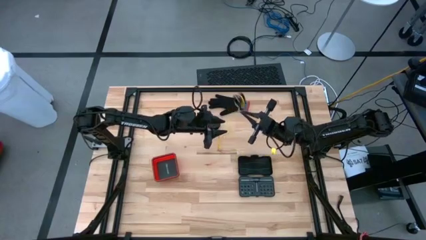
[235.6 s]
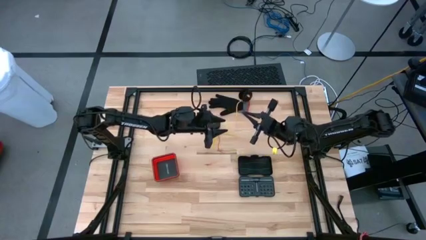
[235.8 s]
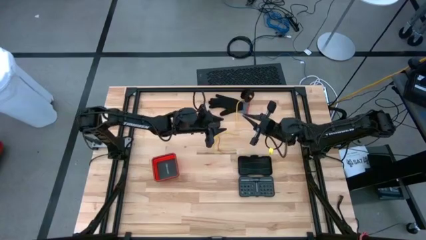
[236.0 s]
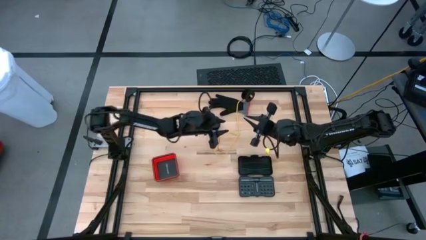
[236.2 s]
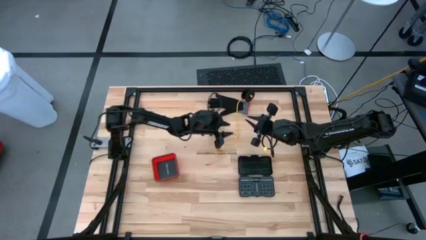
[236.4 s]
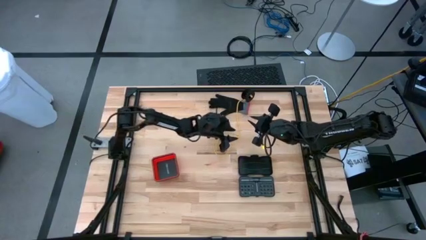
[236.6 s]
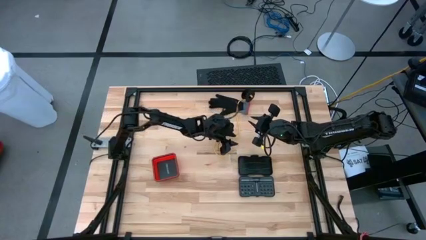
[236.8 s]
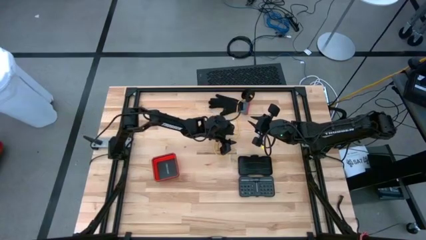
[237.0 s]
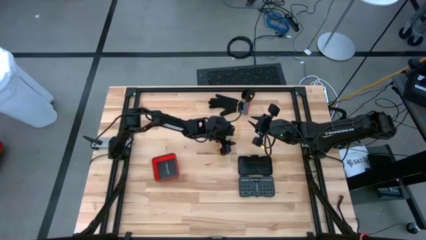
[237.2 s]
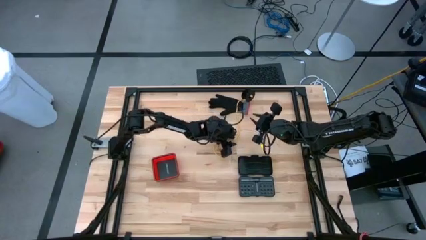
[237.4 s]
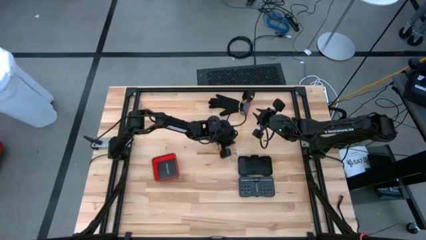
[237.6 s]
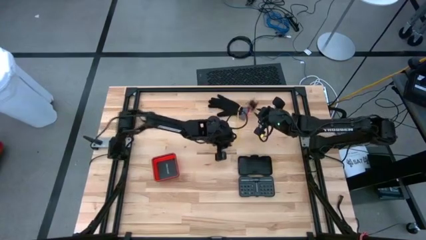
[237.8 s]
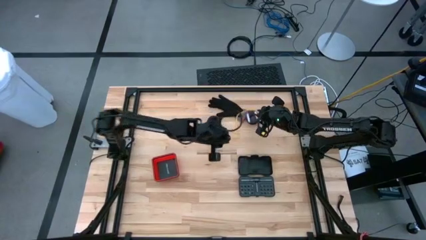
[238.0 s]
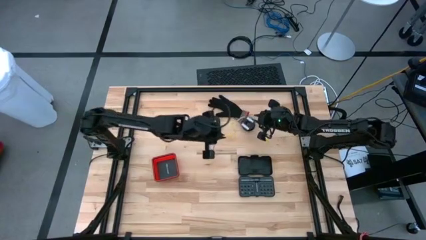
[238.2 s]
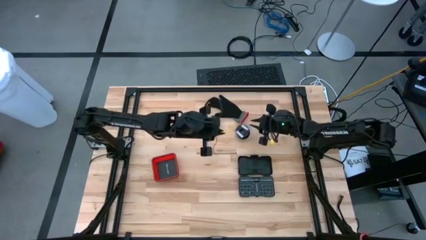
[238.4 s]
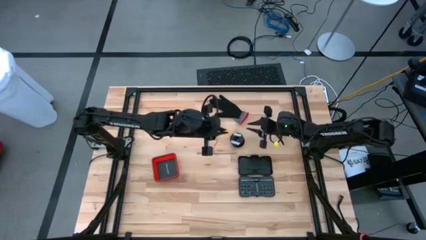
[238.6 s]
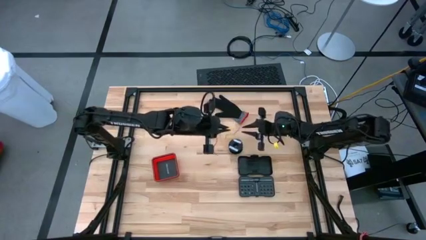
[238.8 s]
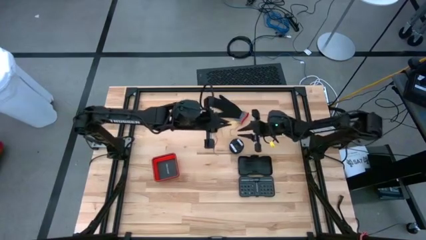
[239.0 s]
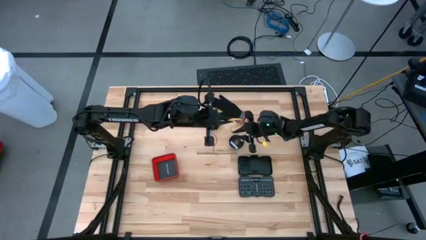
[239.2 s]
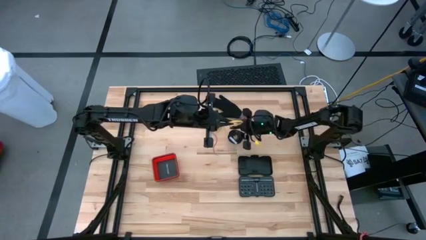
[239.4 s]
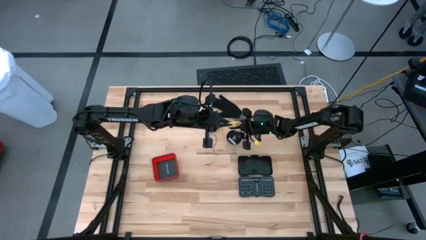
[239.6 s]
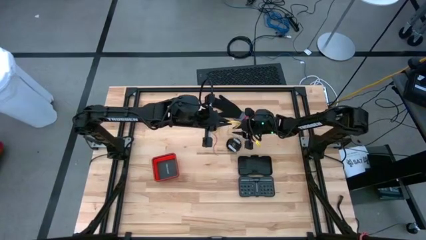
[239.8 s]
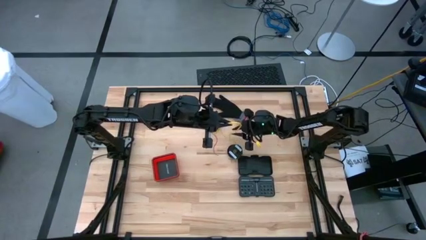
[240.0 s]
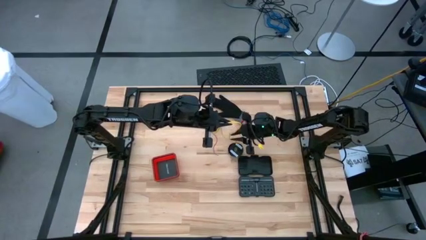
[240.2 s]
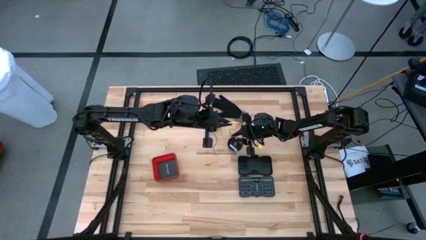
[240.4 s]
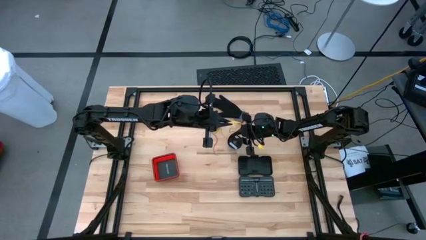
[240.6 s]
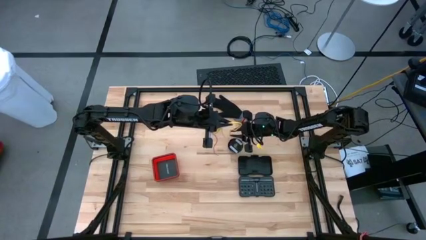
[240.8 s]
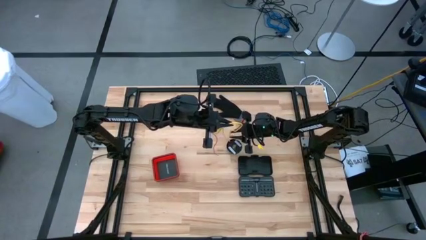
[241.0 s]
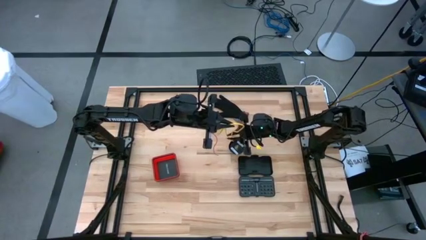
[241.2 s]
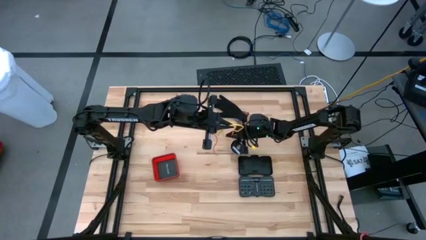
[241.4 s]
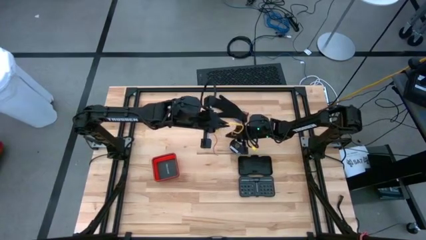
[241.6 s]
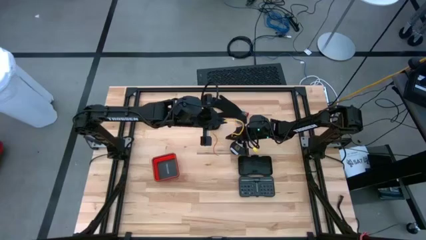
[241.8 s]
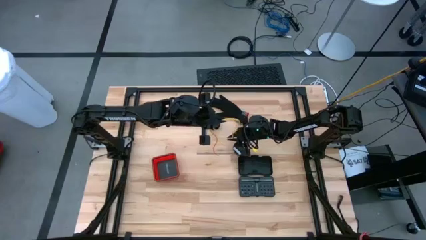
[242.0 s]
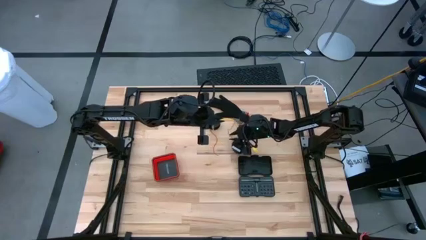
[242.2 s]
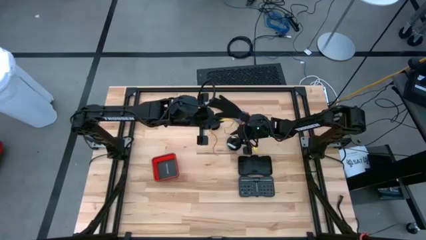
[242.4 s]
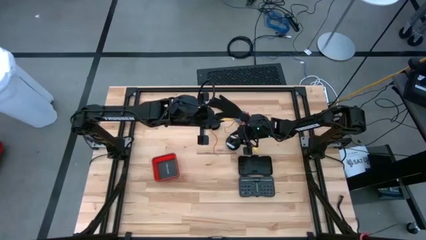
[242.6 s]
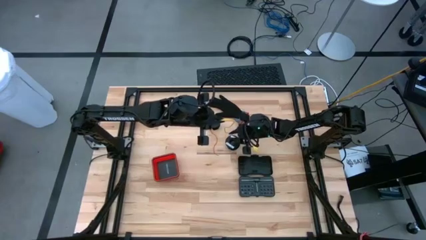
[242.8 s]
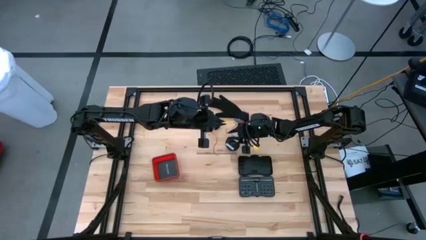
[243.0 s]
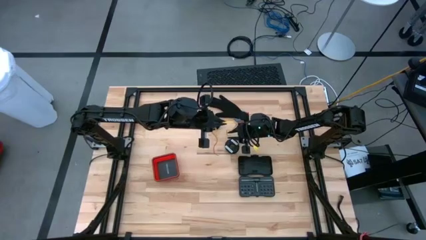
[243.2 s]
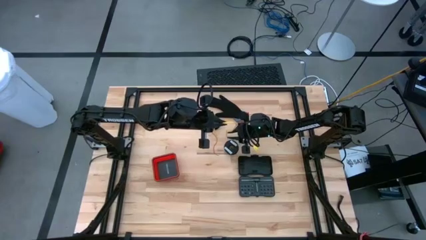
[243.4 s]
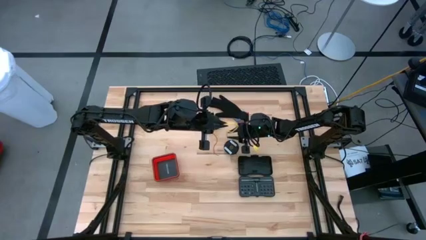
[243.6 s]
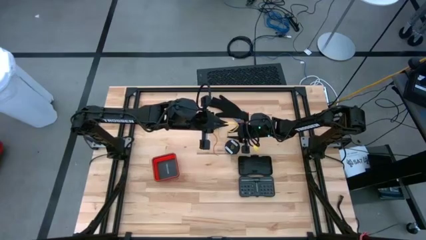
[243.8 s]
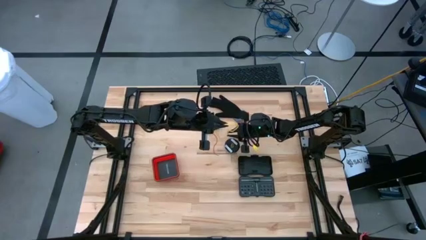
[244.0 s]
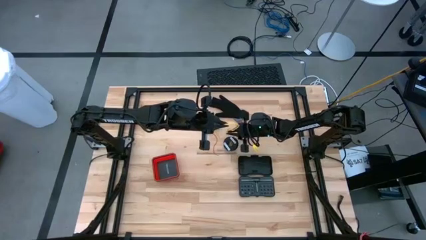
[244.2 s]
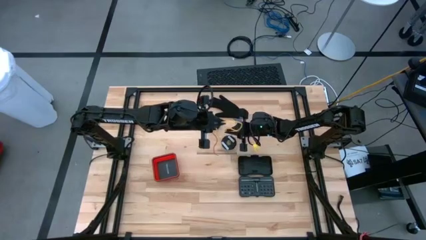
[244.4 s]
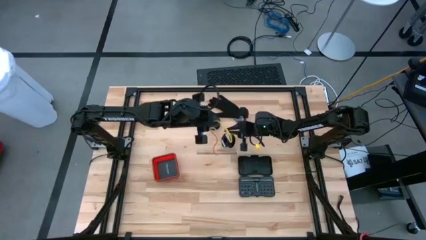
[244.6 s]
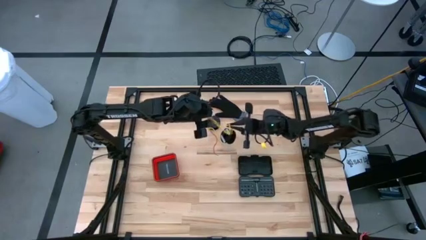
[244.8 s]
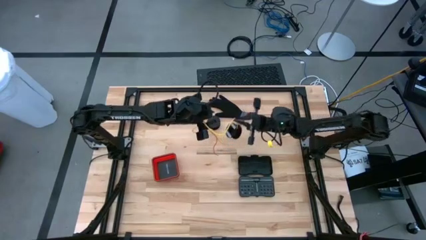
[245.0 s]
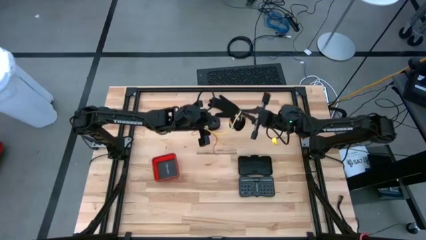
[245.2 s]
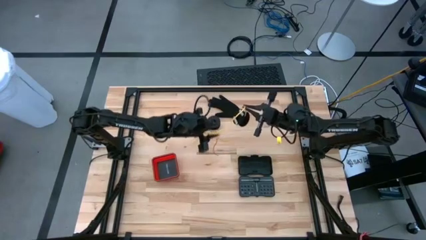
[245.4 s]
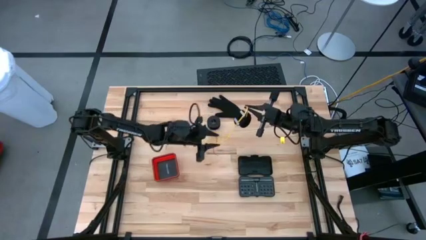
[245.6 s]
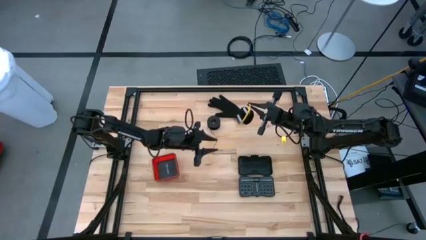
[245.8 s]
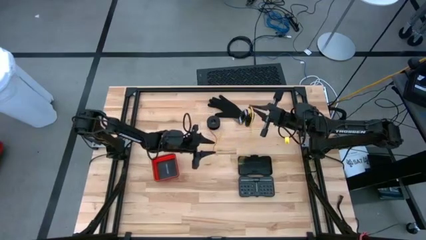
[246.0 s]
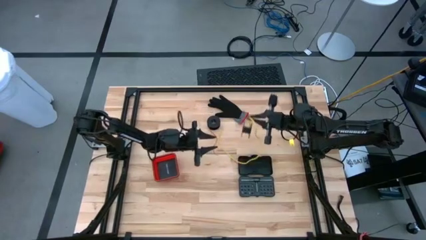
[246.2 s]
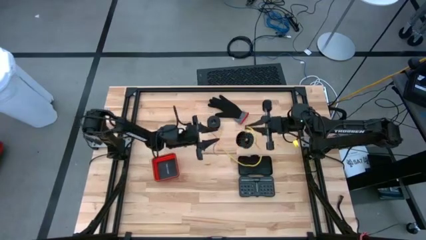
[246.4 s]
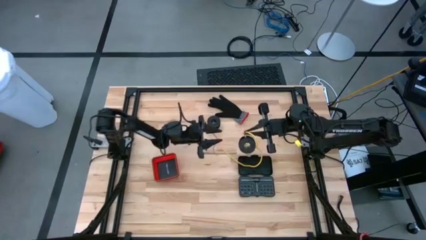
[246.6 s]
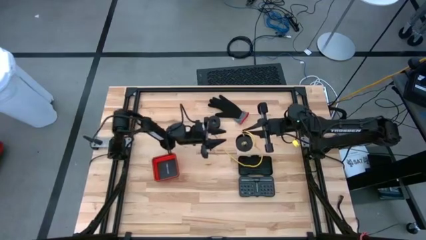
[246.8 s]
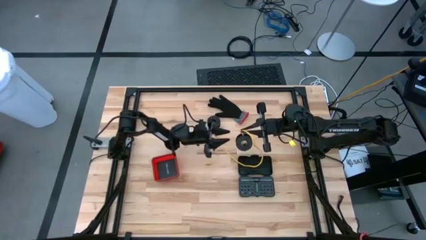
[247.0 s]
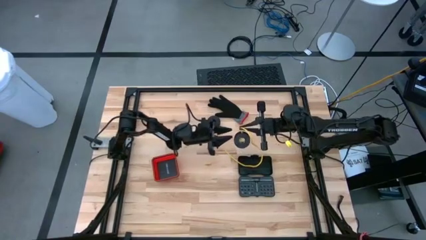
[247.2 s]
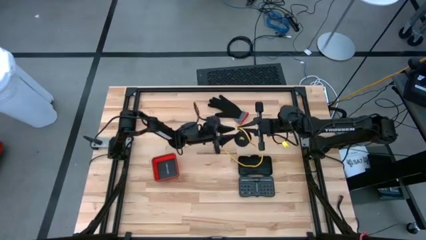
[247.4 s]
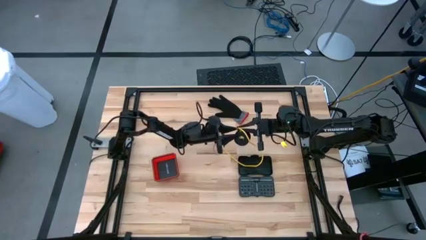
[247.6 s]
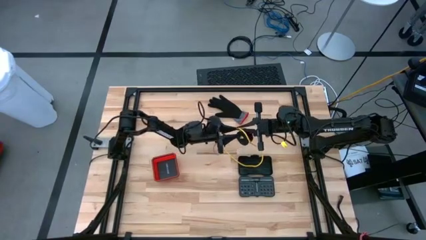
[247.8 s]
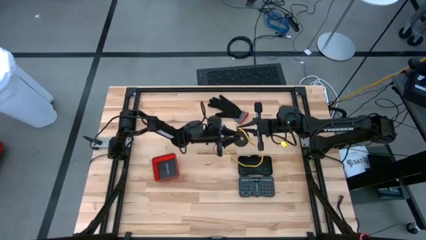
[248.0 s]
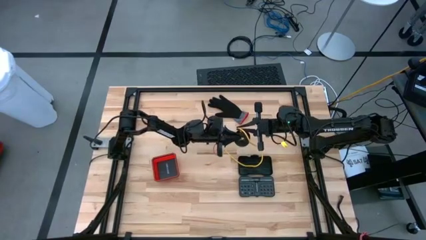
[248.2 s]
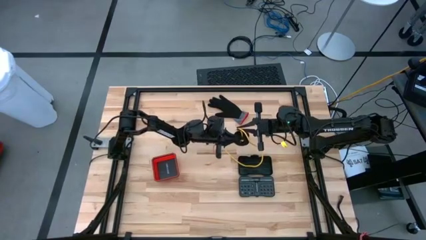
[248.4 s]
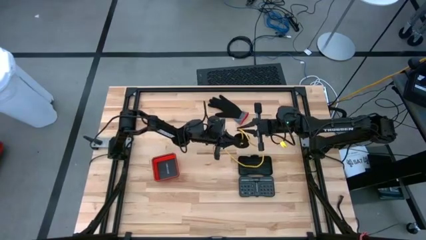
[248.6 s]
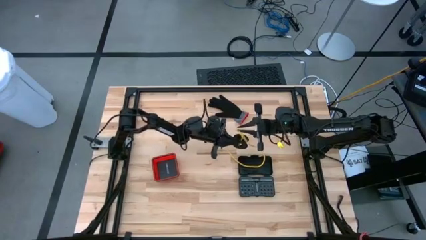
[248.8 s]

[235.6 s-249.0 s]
Task: Coil cords
Uncoil the yellow wire from the spool

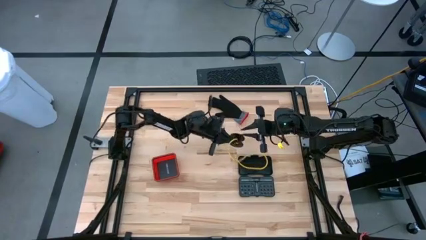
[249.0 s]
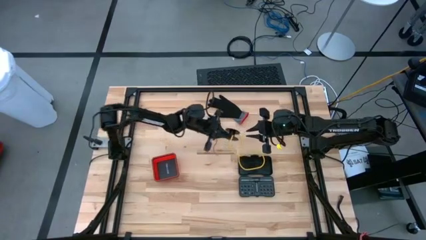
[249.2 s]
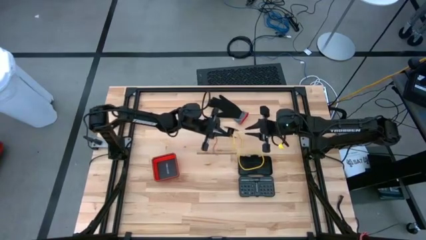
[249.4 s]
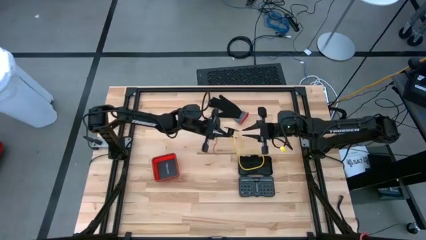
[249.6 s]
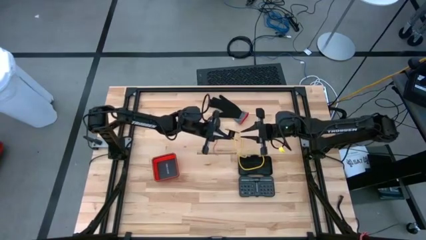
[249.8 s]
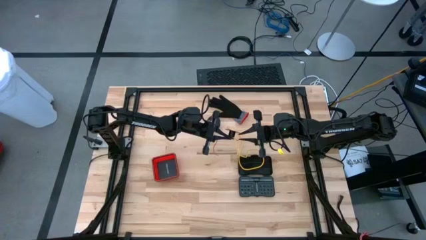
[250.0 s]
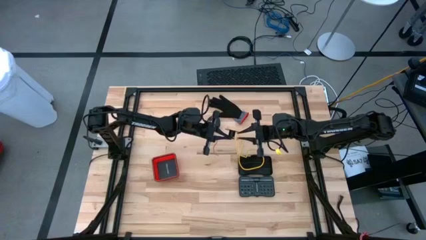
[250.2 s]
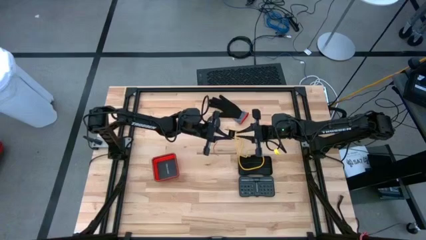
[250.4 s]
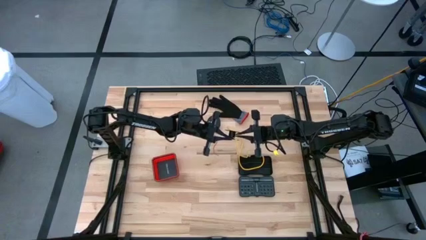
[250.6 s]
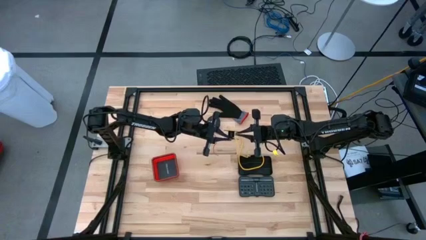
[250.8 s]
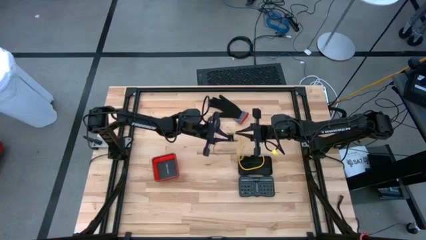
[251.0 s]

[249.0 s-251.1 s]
Coil the yellow wire onto the spool
